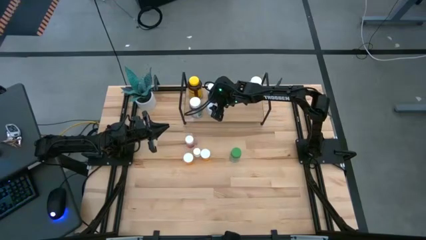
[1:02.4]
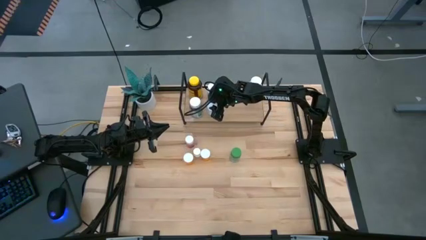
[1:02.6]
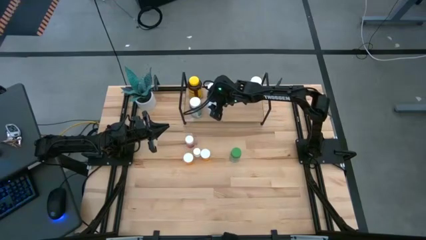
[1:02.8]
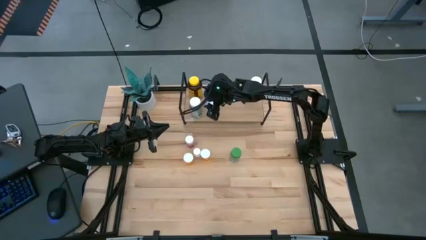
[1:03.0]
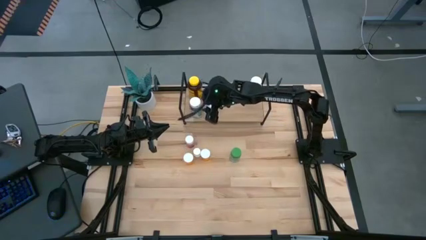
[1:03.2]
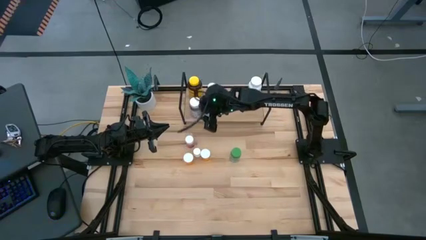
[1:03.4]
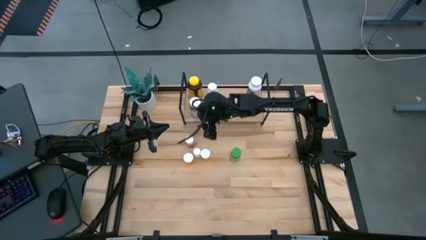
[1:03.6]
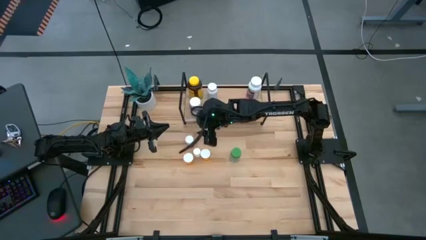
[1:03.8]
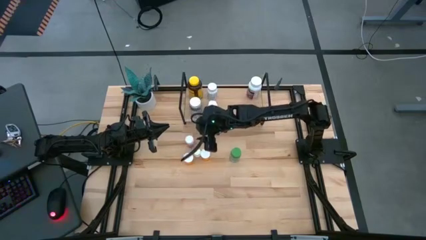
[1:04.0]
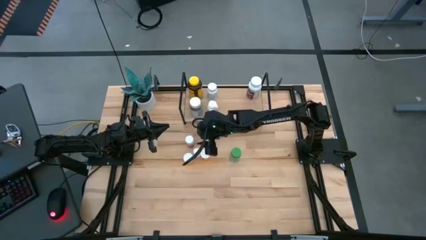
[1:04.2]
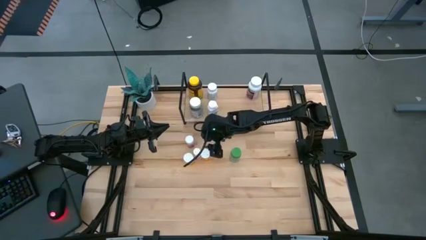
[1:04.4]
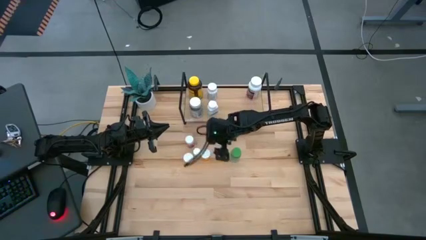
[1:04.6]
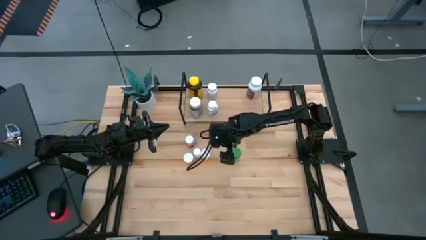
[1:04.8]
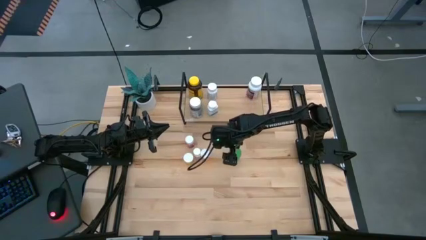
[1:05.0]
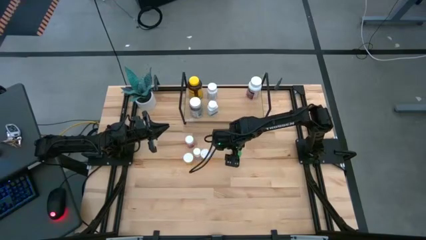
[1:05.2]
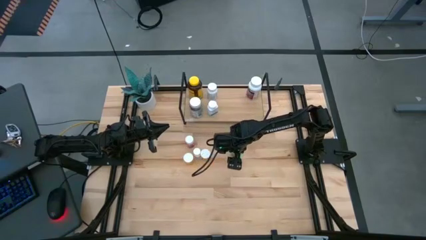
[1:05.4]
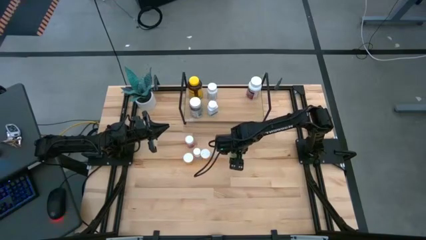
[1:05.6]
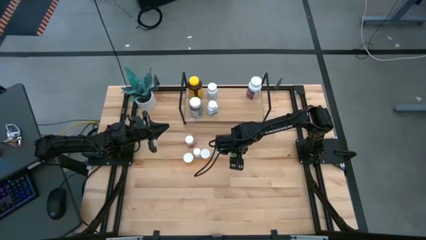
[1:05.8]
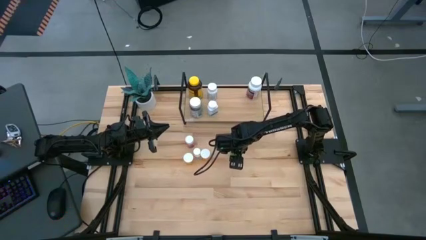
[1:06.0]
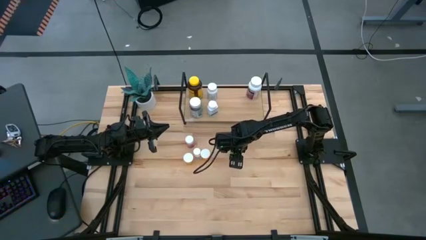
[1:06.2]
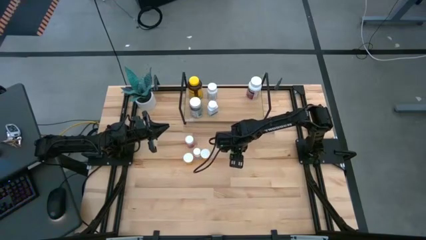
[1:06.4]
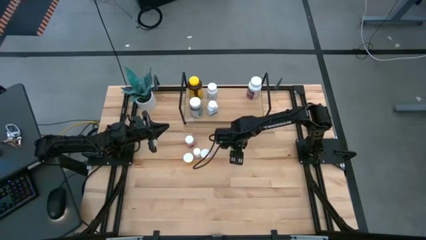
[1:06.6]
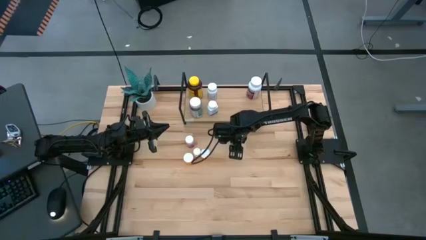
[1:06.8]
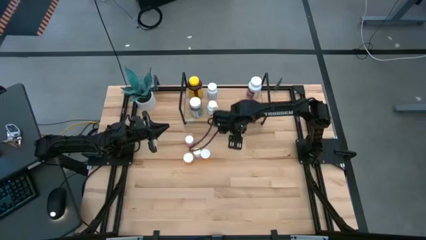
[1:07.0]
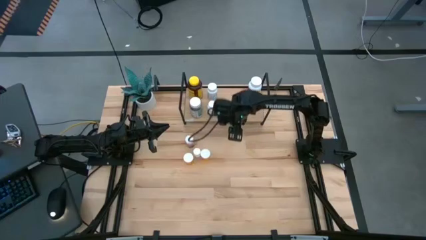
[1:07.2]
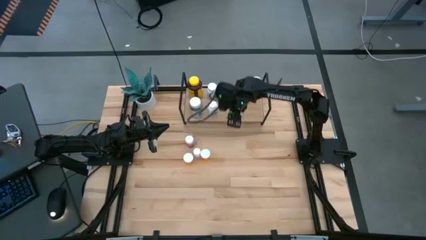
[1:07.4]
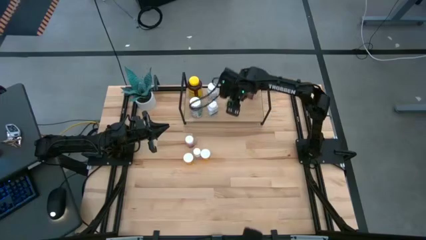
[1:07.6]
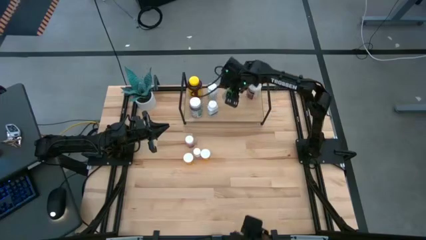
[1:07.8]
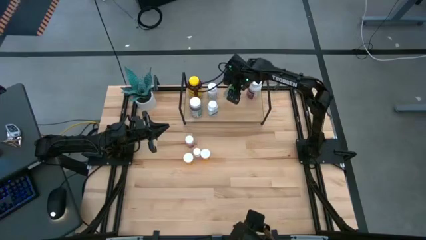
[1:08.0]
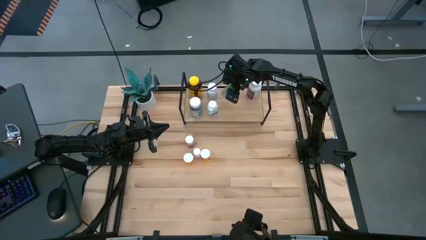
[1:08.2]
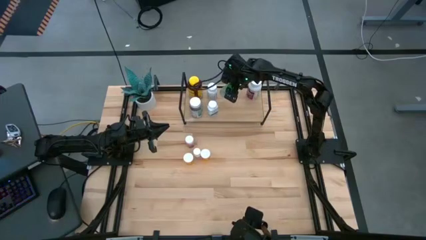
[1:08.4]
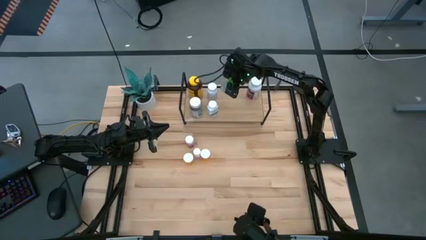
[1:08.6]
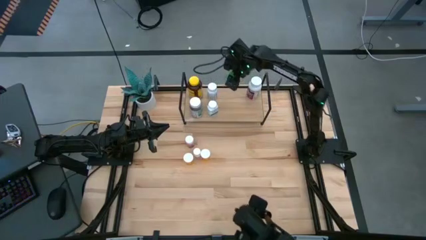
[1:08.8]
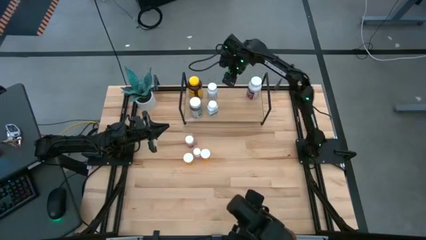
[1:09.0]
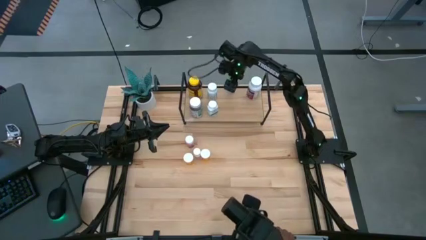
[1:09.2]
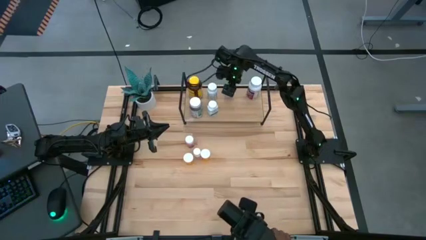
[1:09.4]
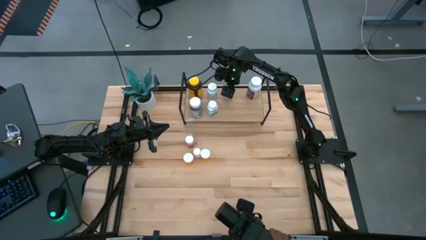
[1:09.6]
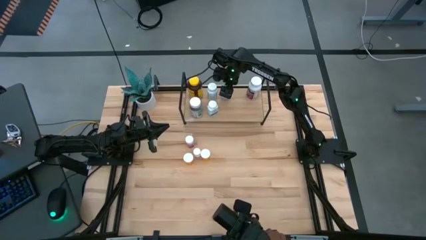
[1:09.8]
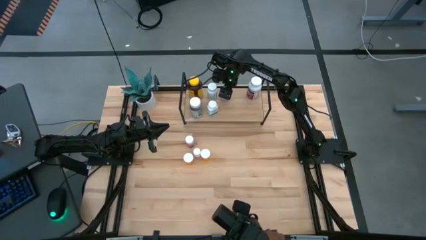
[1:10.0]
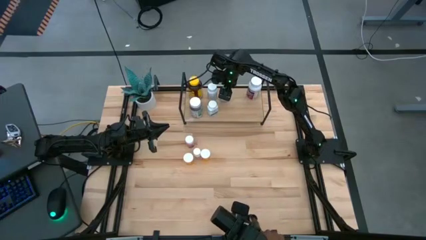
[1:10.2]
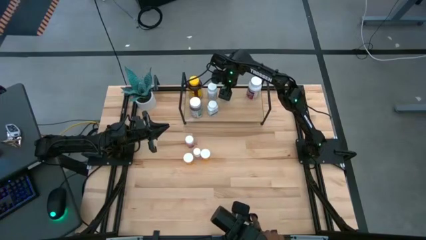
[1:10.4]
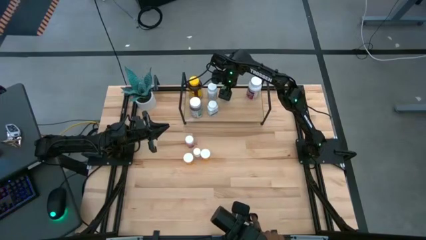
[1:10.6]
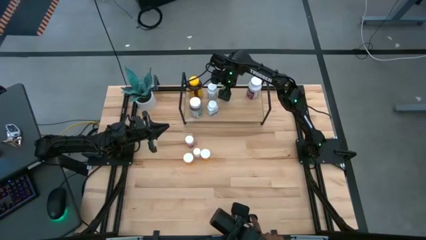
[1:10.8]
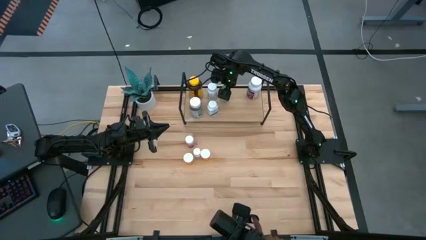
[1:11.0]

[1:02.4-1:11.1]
Task: Pick and place medicine bottles onto shelf by color
Put the green medicine bottle on the shelf

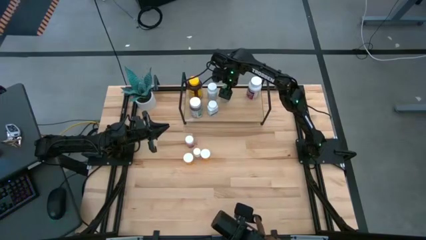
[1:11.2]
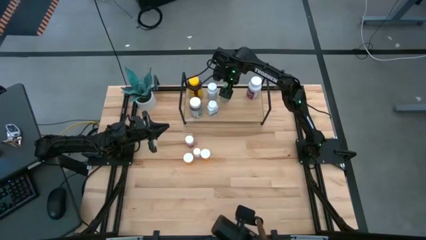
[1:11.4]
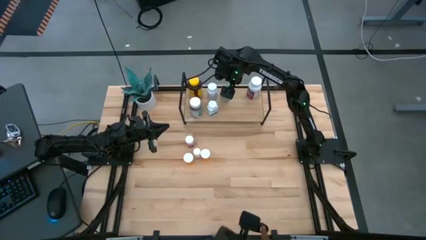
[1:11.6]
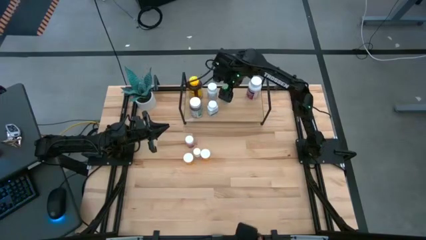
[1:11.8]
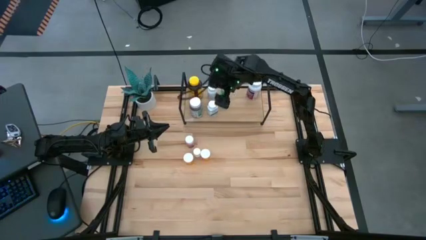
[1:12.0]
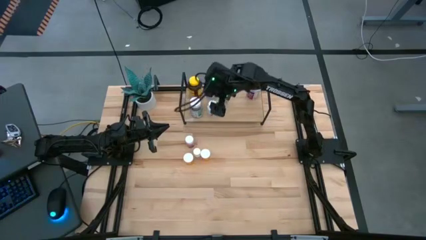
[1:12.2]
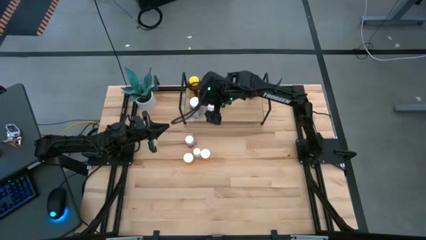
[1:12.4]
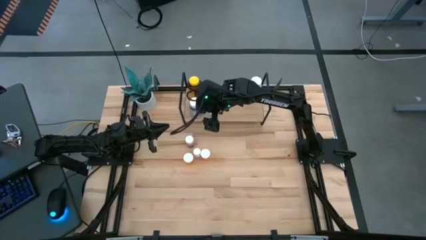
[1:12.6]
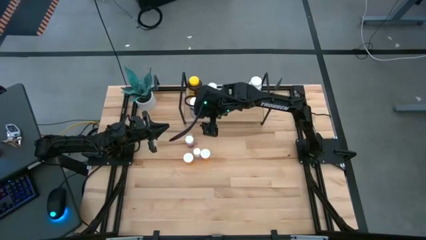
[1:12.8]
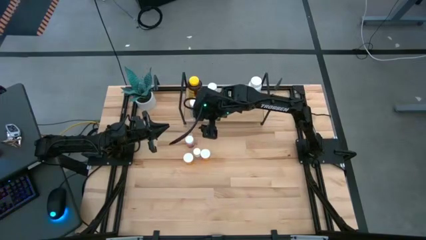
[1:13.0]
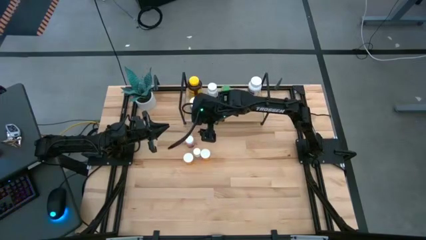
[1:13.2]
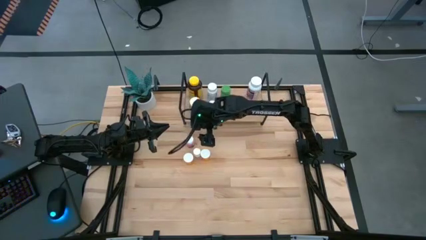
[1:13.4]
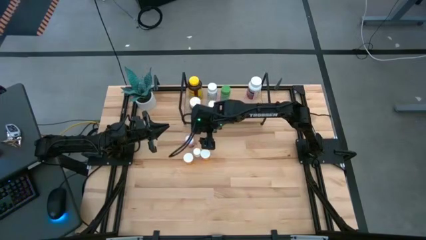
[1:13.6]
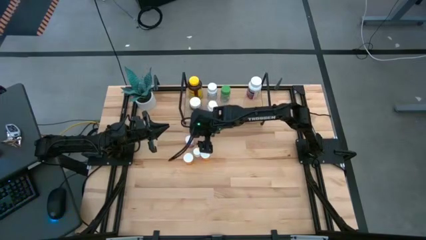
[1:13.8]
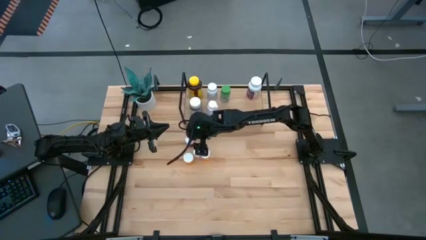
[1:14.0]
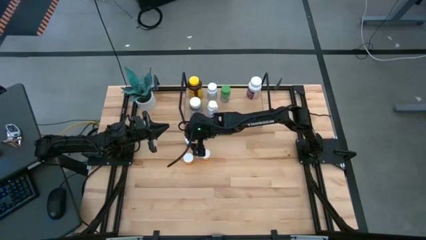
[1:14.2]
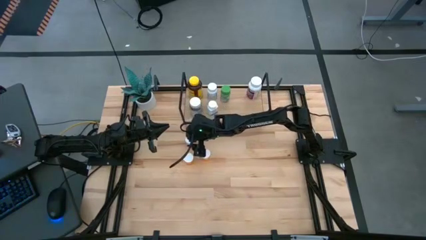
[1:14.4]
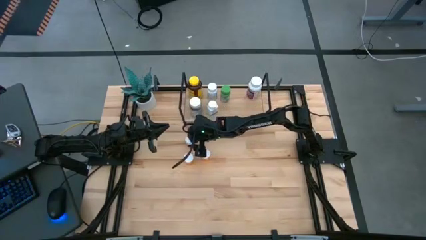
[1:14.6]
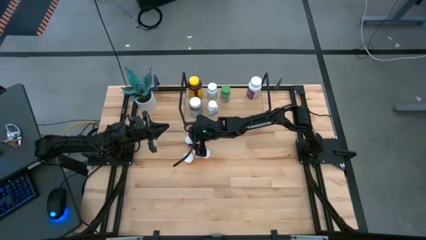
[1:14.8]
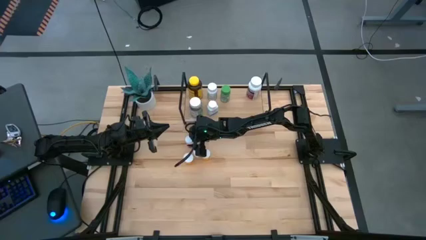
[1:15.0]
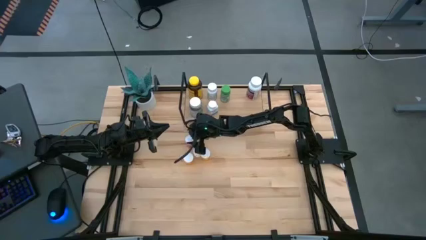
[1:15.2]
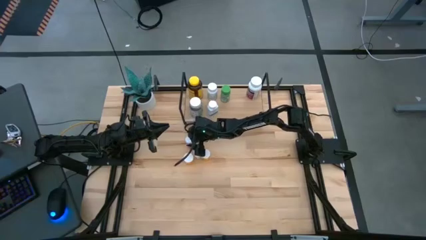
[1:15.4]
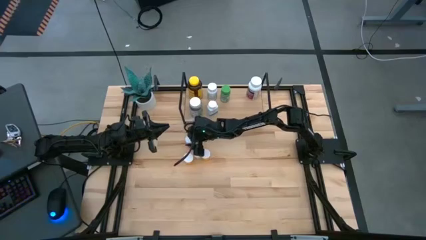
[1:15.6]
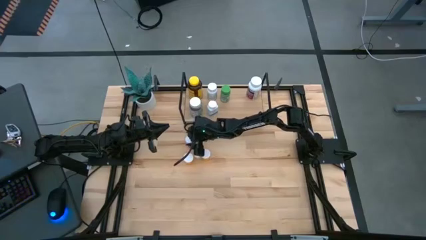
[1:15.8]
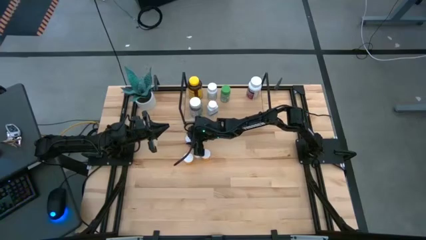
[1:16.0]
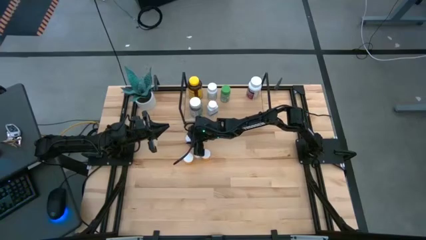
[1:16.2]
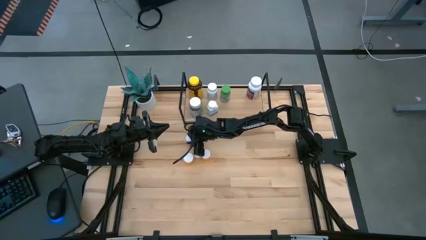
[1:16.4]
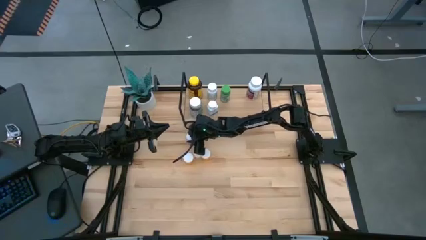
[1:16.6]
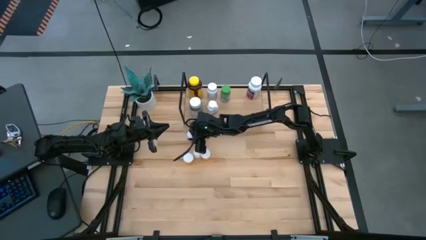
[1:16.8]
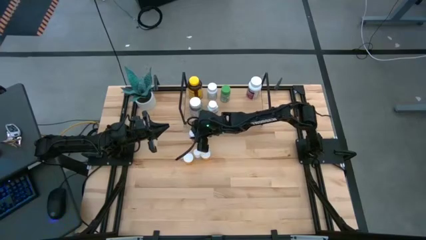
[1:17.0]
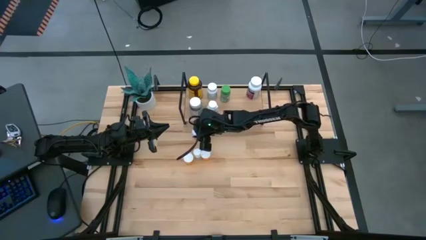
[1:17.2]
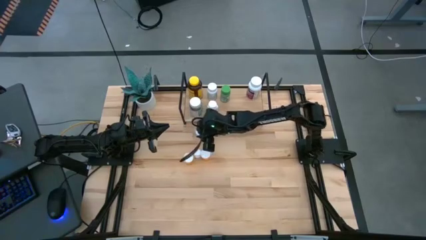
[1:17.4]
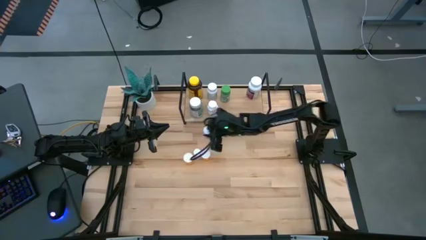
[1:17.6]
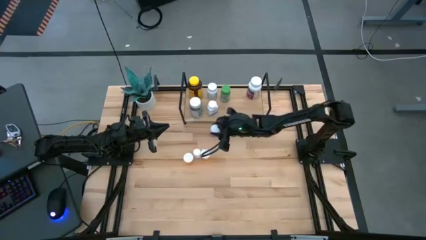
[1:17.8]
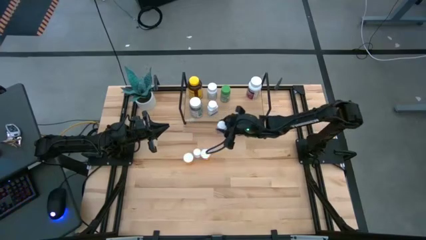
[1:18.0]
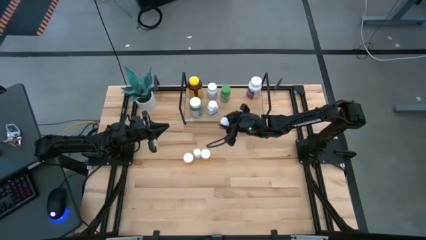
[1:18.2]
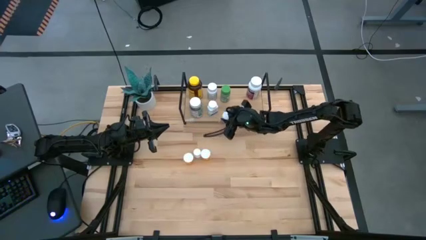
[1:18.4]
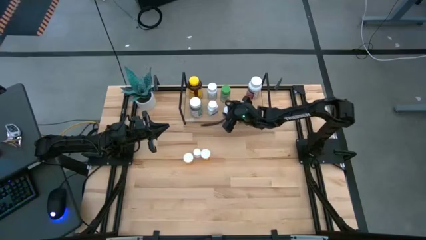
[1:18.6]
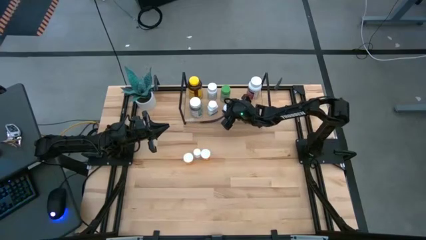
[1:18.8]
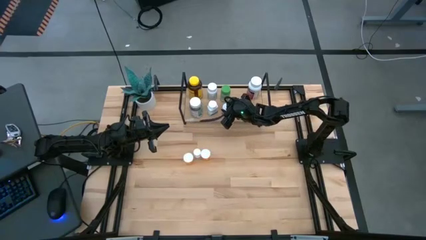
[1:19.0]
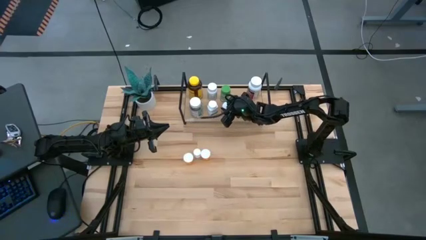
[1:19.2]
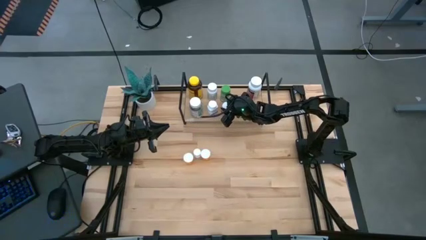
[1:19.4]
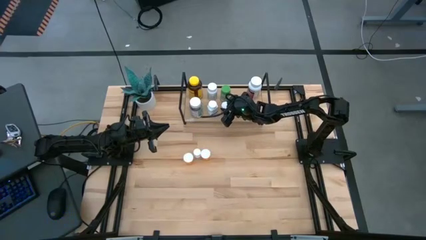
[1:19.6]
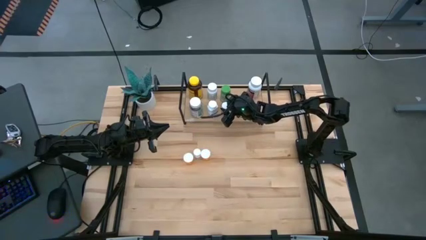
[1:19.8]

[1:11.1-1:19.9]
Put the pink medicine bottle on the shelf
